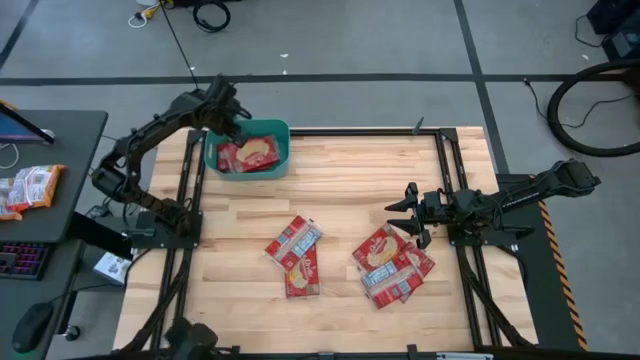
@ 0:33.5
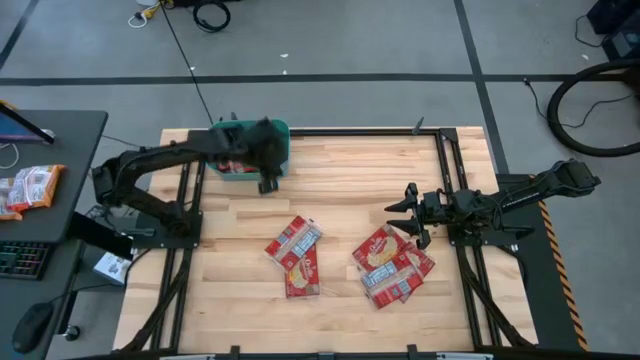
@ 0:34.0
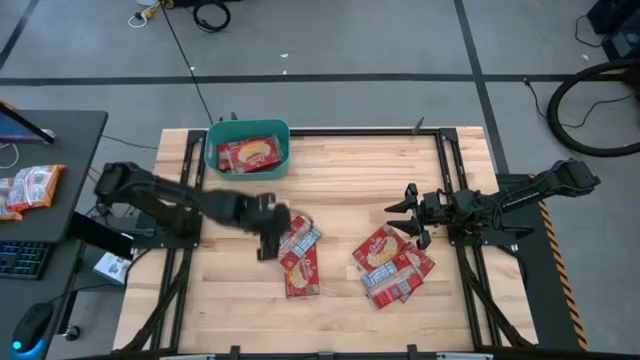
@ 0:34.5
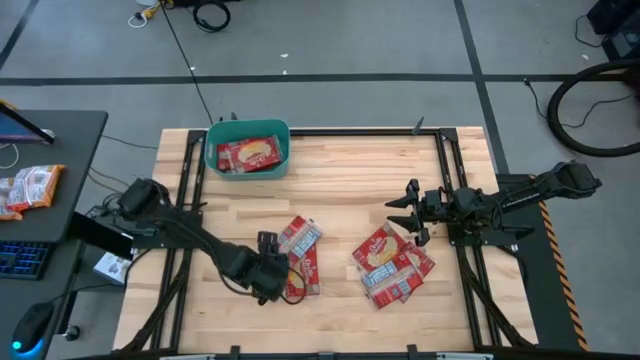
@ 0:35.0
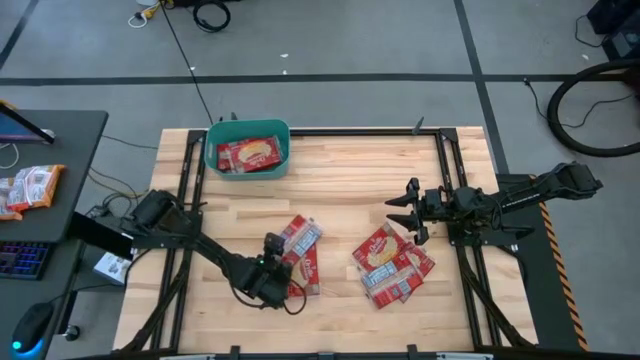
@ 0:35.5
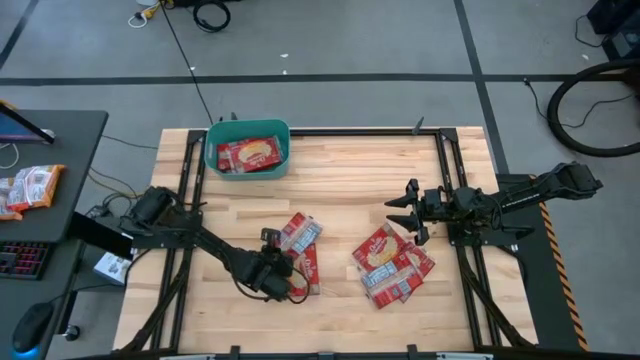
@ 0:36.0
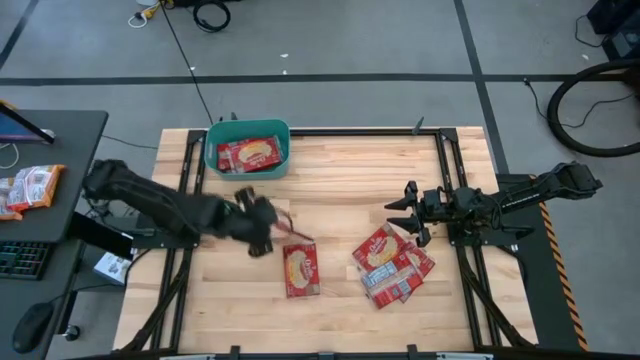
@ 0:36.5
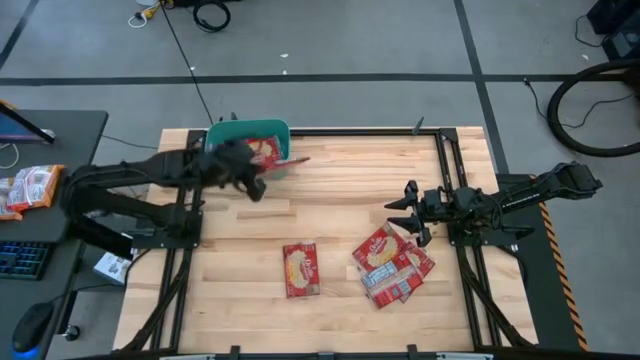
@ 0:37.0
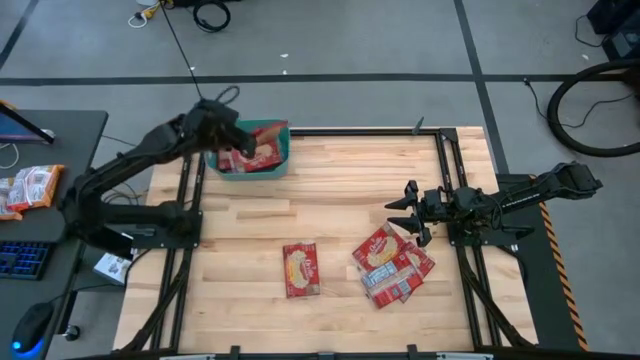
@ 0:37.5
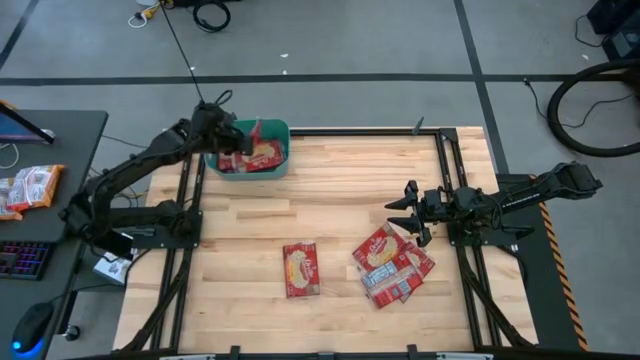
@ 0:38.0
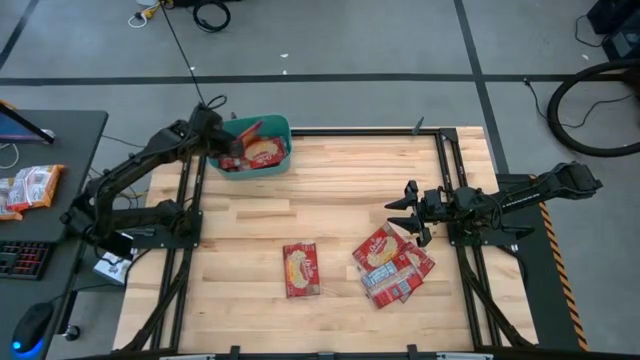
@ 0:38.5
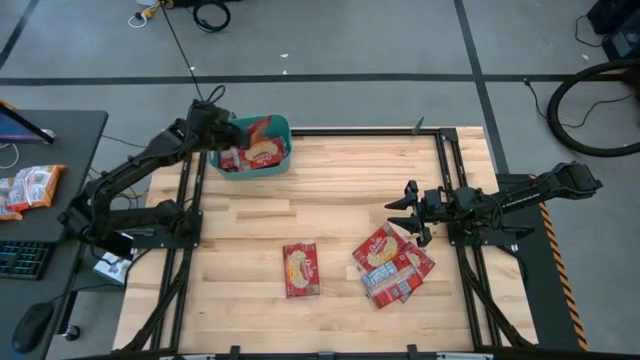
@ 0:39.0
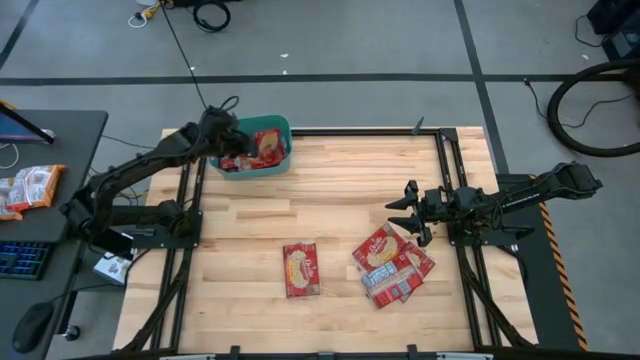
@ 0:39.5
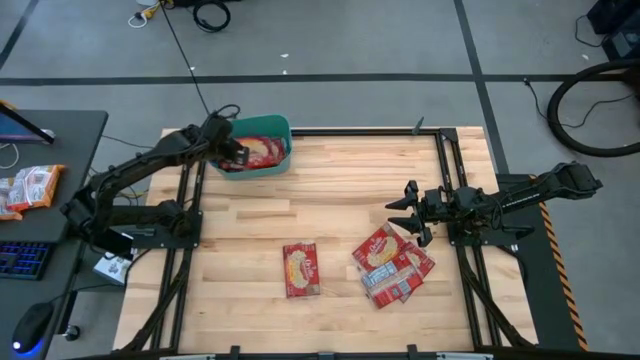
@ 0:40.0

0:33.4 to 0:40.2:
Task: Sort popcorn bags into baskets
Put the popcorn sachet into the bin

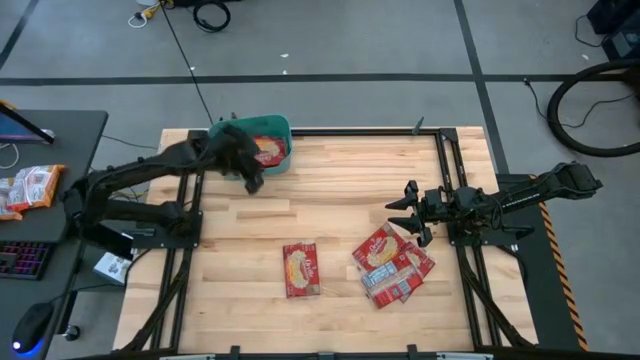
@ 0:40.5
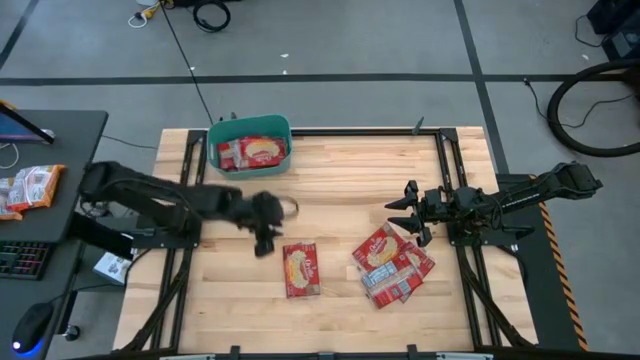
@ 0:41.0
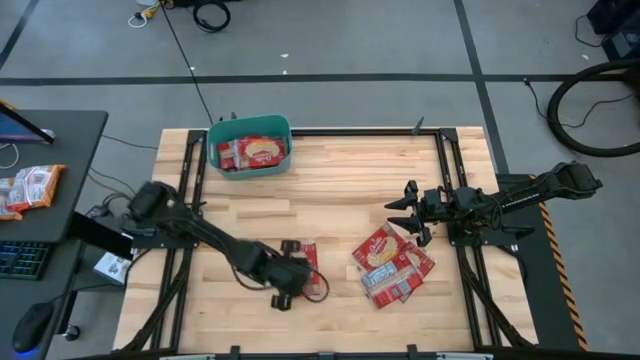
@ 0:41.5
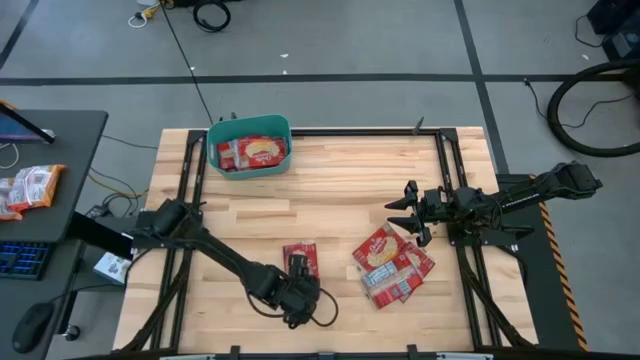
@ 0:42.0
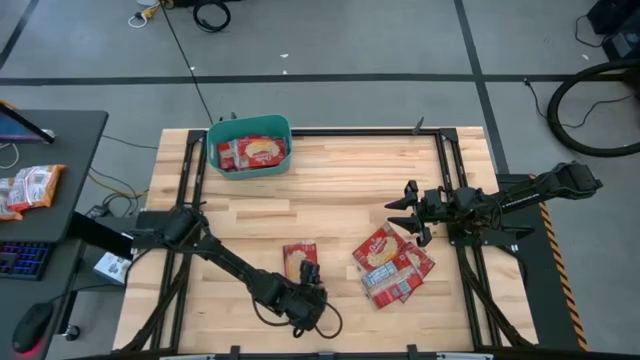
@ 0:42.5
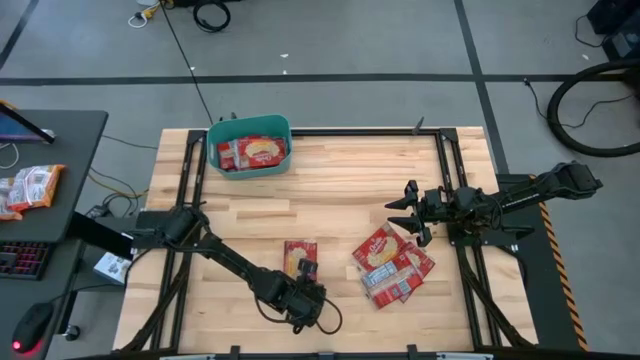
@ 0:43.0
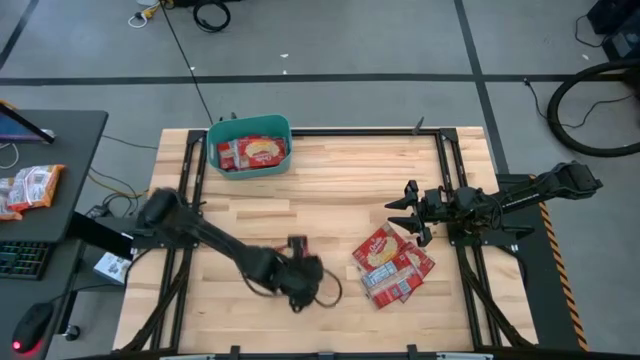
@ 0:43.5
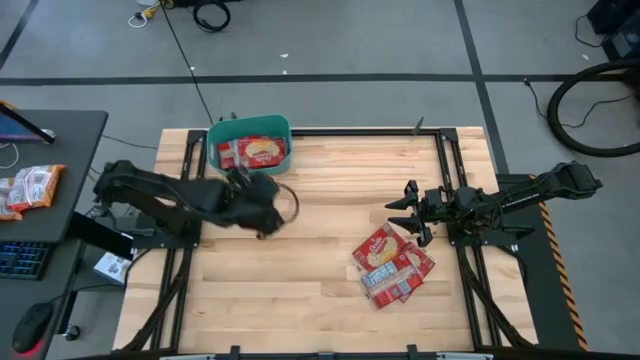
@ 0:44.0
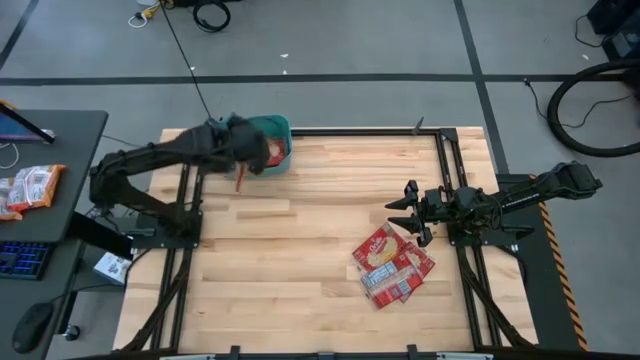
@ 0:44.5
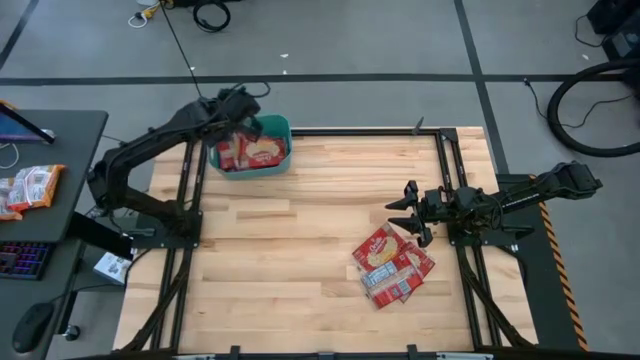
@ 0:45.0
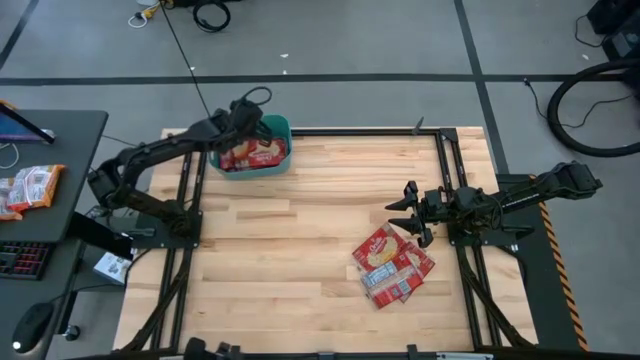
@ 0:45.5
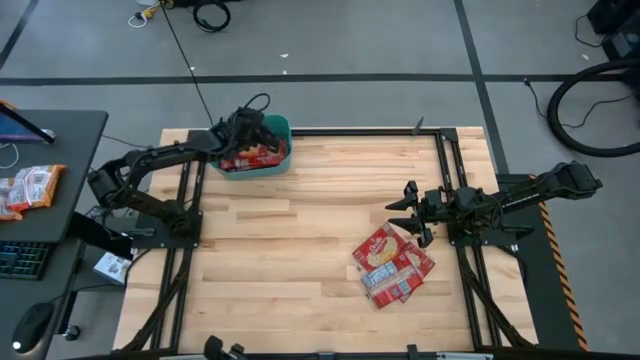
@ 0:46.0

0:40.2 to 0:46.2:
Put the popcorn sachet into the bin

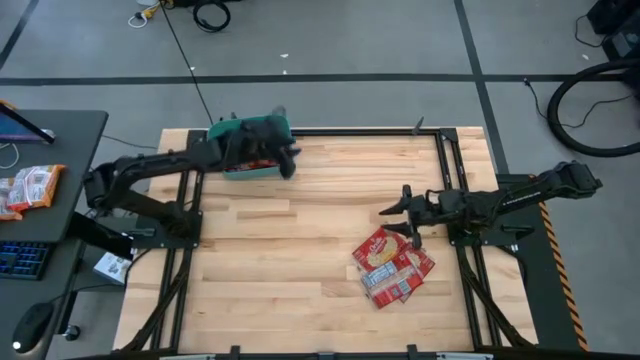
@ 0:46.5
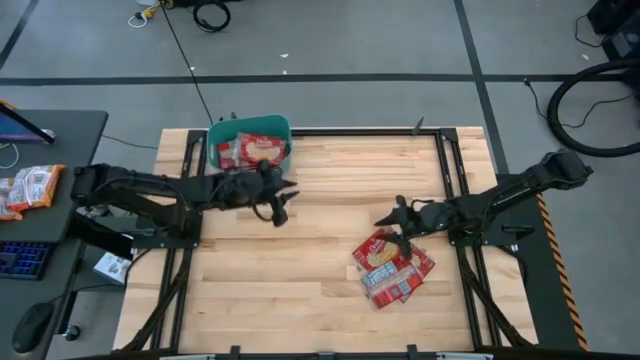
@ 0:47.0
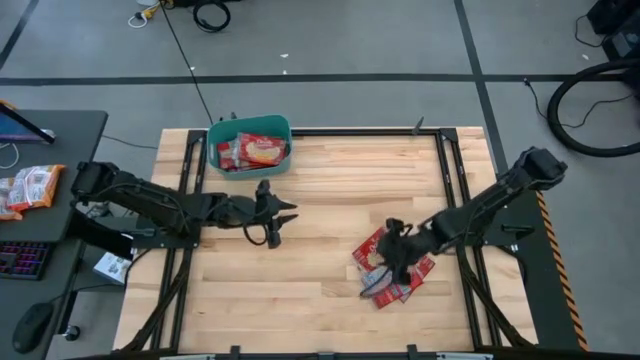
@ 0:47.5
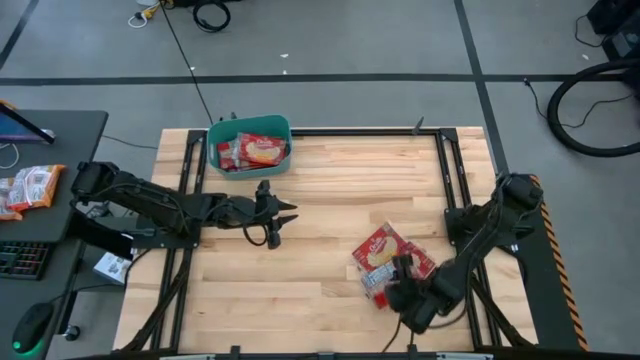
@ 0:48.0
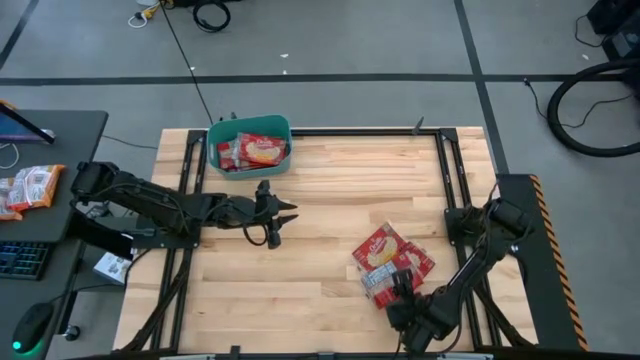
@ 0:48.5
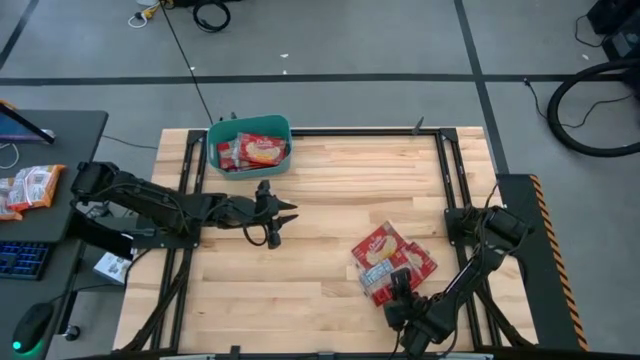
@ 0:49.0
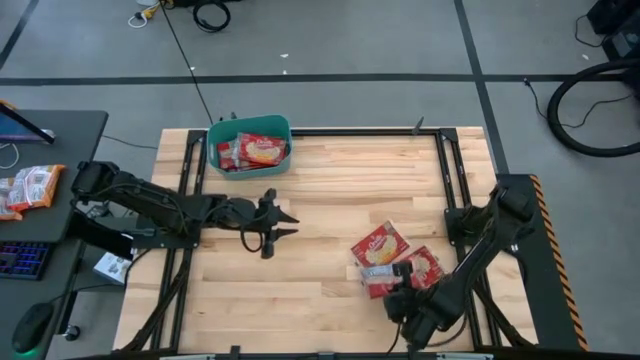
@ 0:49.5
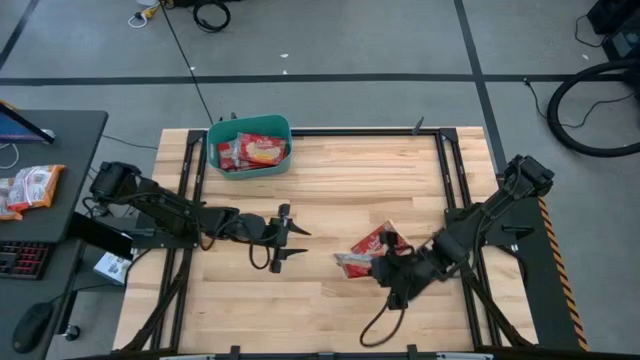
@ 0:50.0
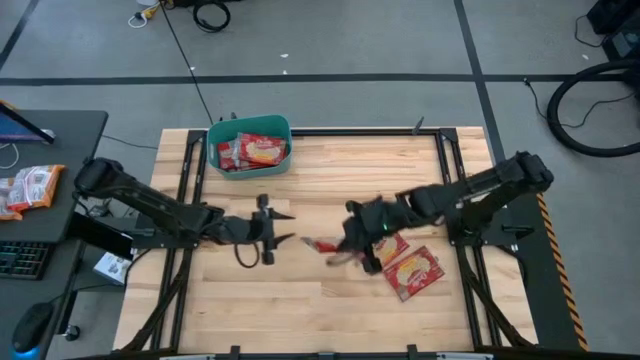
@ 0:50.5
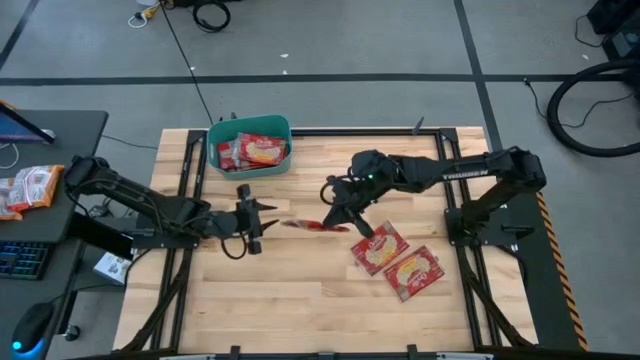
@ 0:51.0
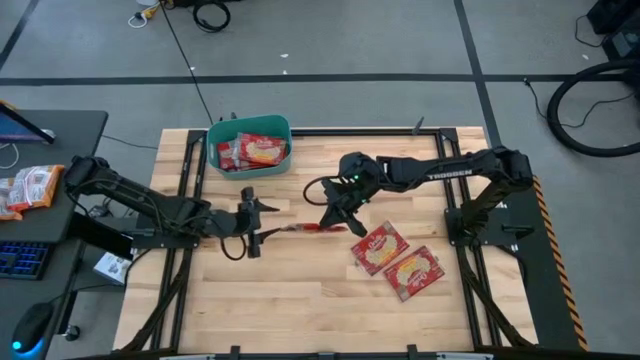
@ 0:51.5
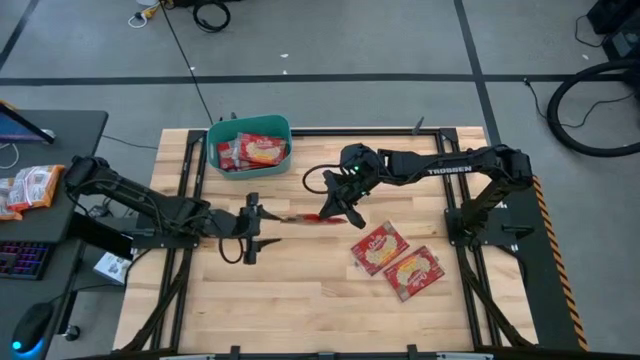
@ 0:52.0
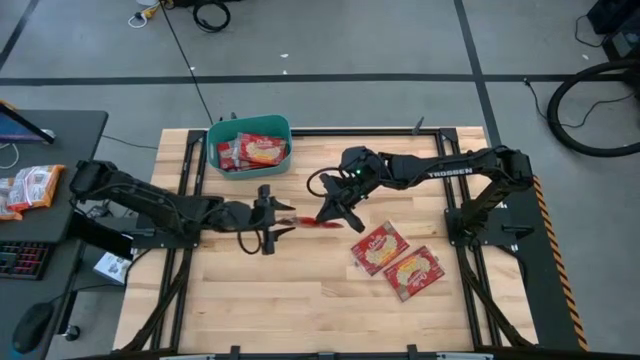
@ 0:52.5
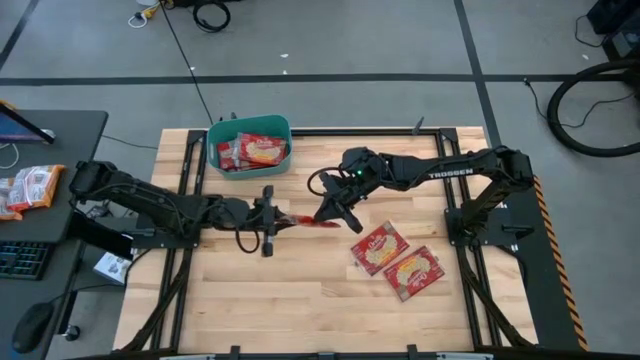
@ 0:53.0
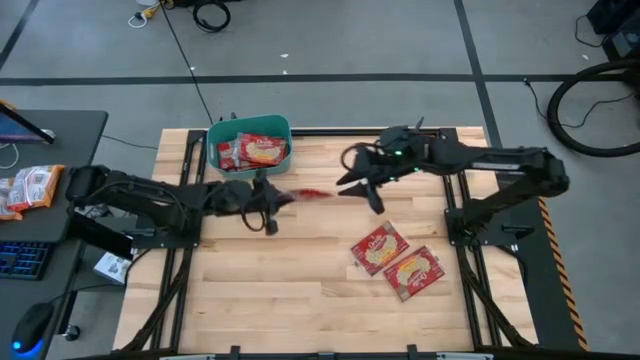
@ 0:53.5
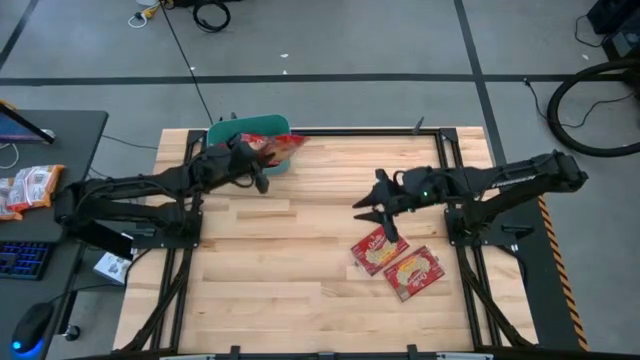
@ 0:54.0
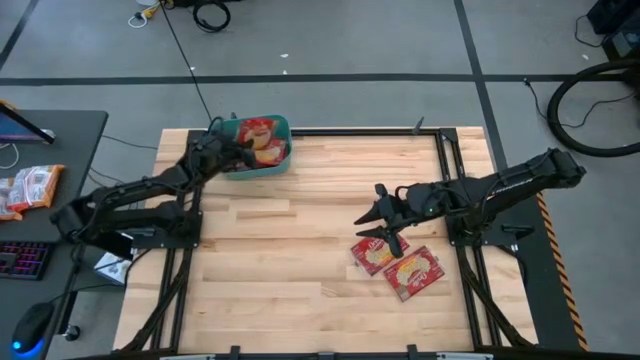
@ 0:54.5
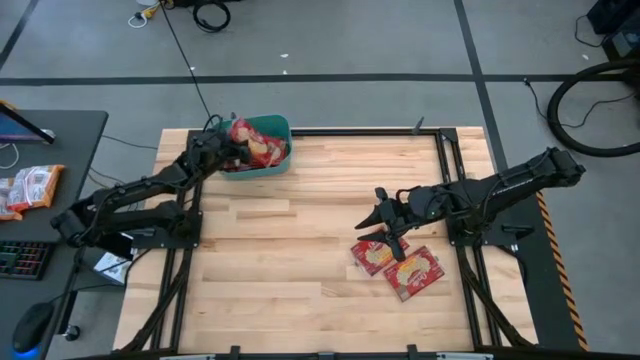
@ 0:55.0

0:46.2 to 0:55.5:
Put the popcorn sachet into the bin
